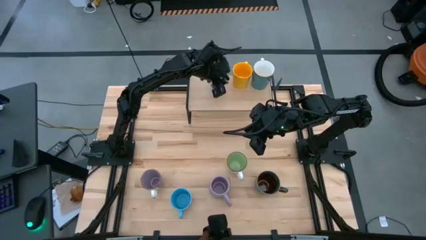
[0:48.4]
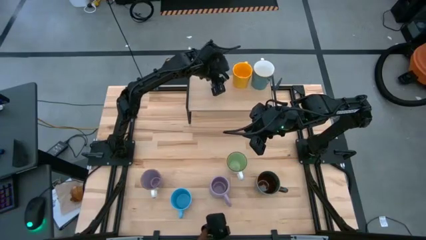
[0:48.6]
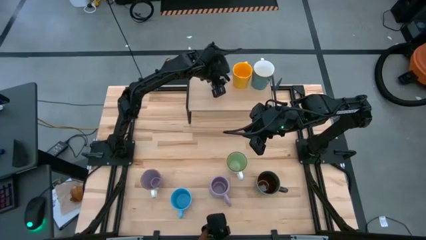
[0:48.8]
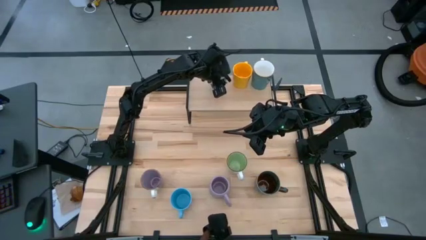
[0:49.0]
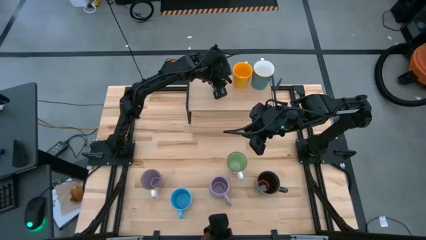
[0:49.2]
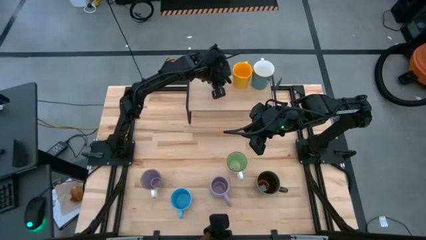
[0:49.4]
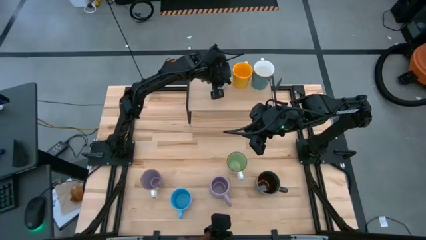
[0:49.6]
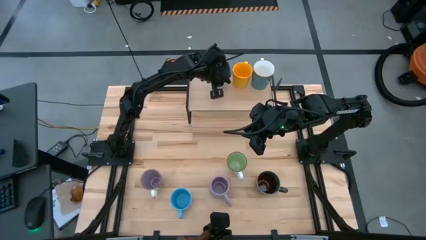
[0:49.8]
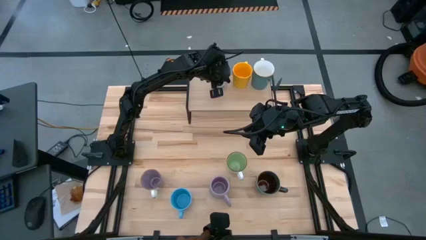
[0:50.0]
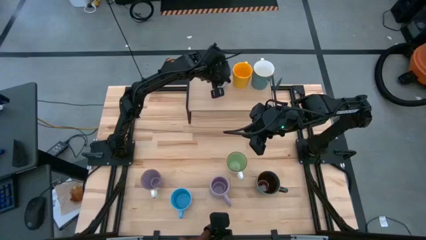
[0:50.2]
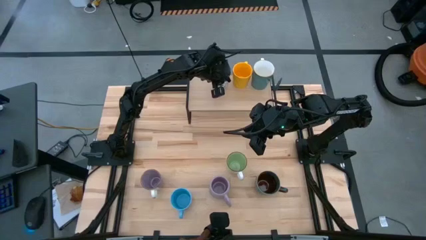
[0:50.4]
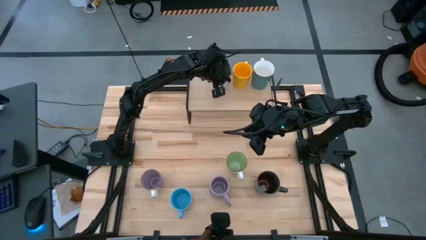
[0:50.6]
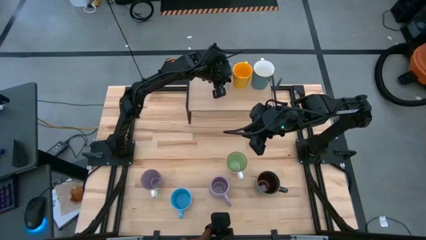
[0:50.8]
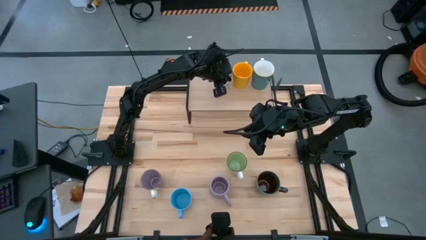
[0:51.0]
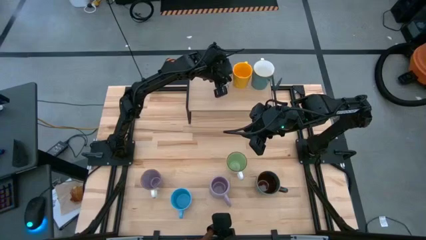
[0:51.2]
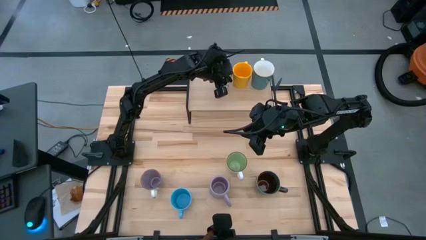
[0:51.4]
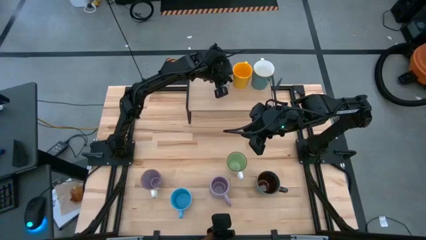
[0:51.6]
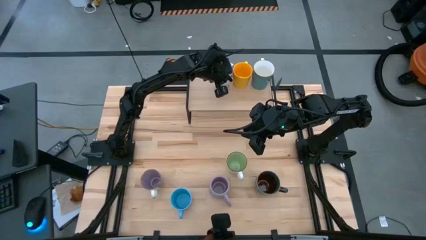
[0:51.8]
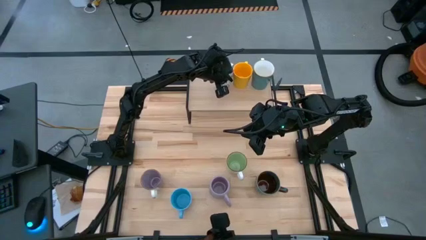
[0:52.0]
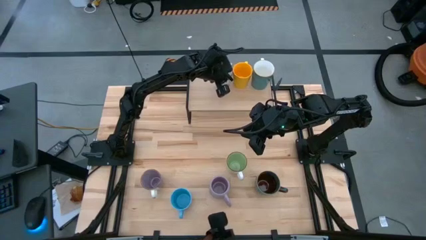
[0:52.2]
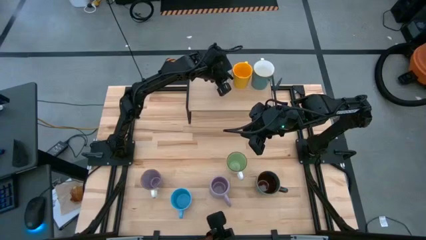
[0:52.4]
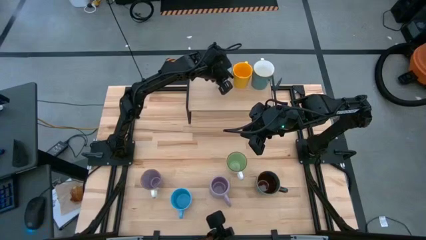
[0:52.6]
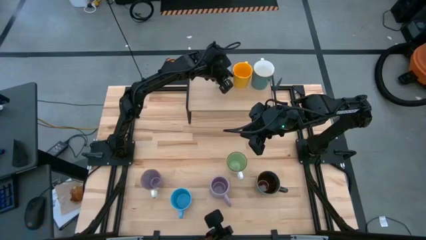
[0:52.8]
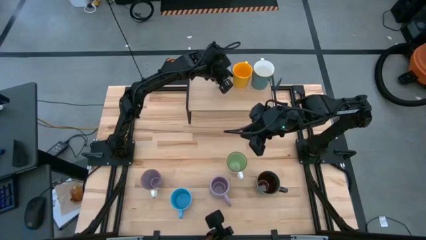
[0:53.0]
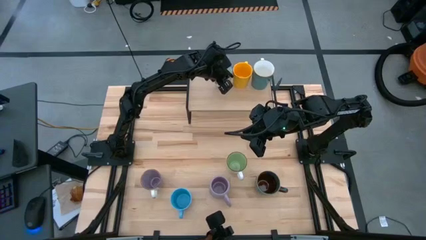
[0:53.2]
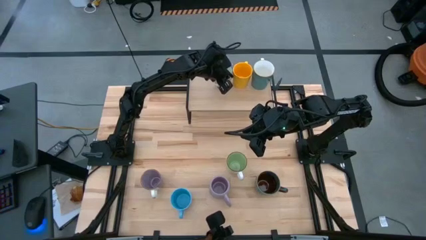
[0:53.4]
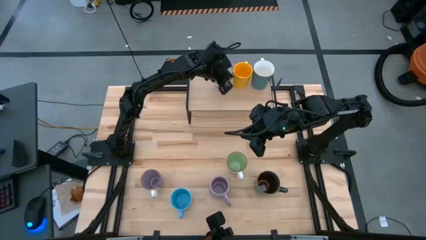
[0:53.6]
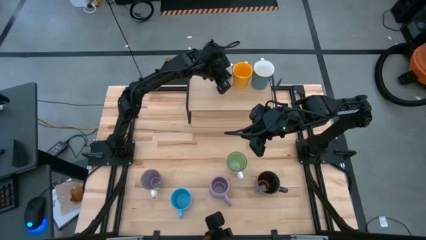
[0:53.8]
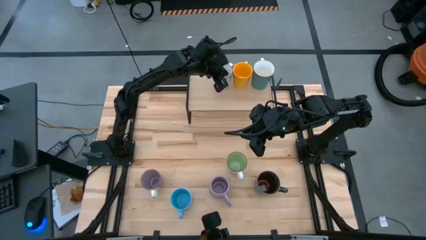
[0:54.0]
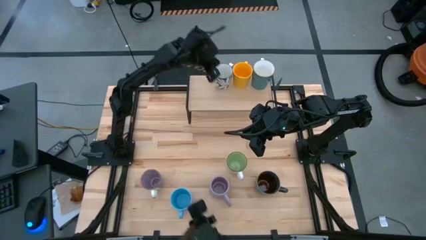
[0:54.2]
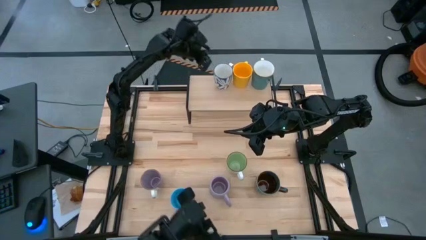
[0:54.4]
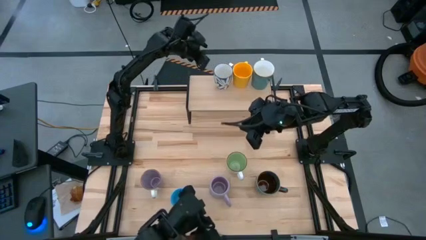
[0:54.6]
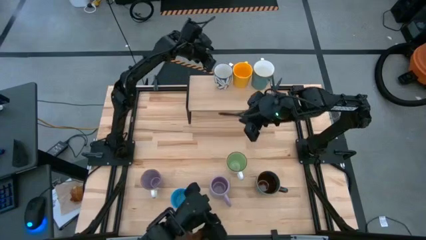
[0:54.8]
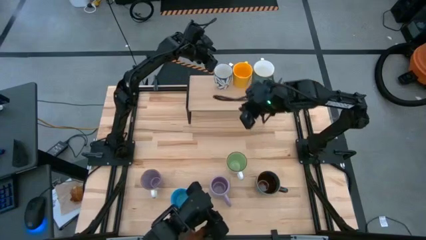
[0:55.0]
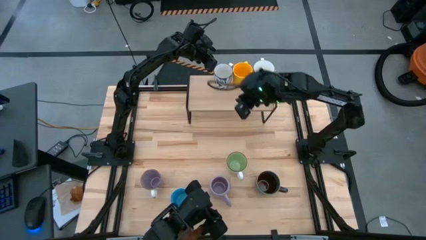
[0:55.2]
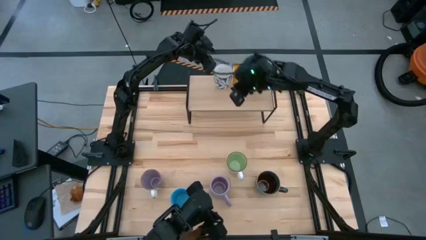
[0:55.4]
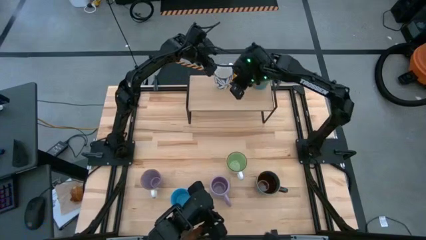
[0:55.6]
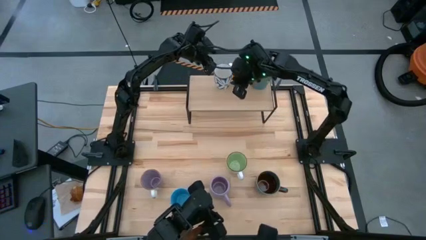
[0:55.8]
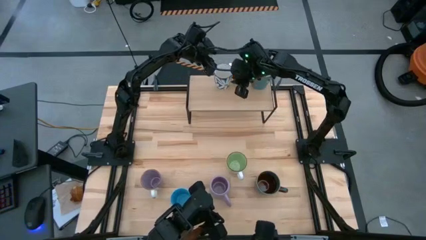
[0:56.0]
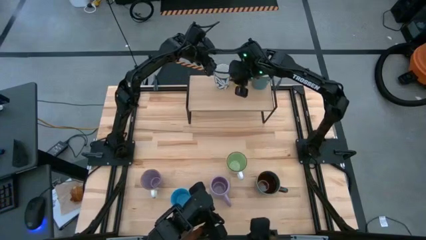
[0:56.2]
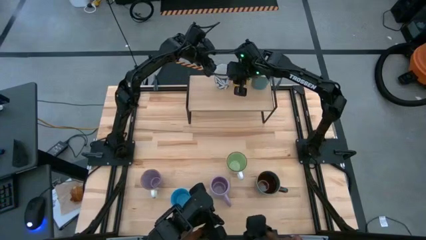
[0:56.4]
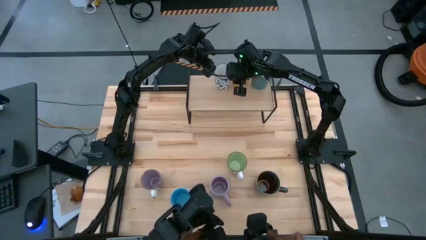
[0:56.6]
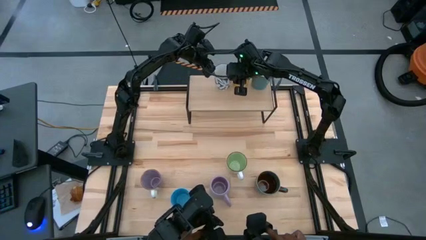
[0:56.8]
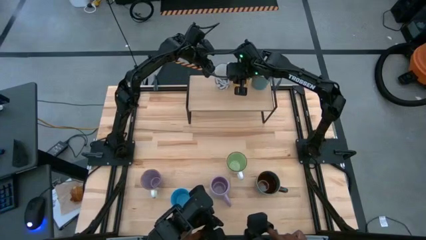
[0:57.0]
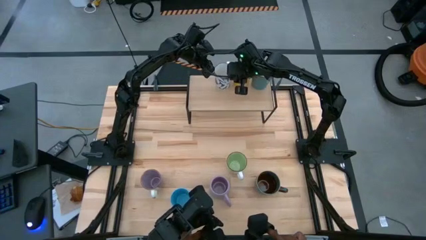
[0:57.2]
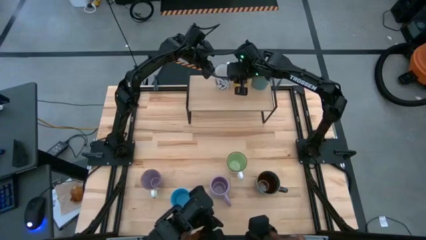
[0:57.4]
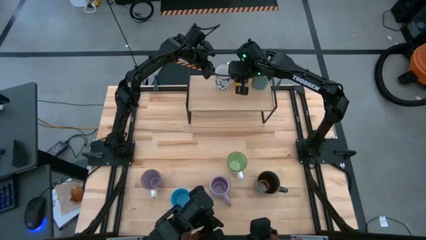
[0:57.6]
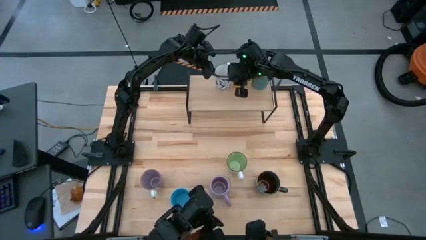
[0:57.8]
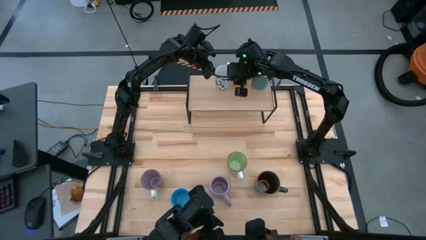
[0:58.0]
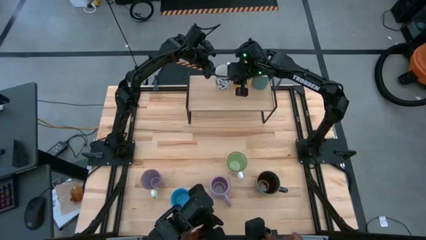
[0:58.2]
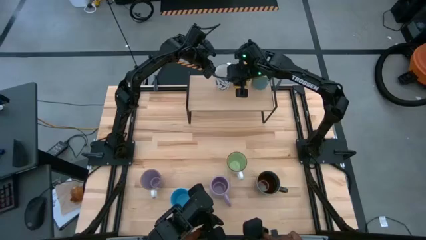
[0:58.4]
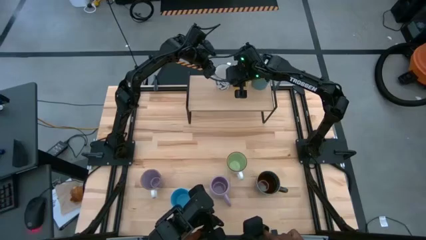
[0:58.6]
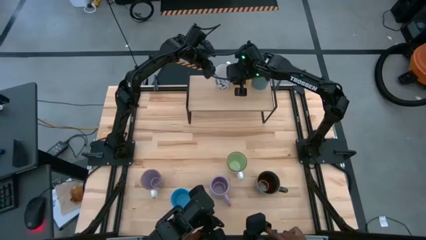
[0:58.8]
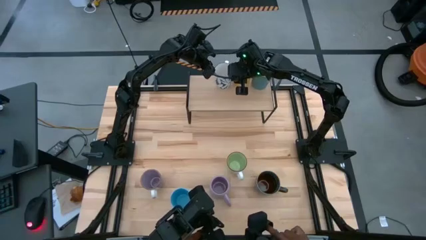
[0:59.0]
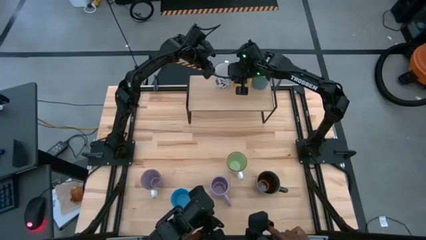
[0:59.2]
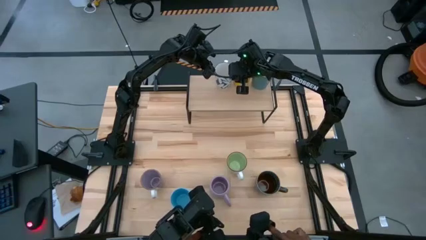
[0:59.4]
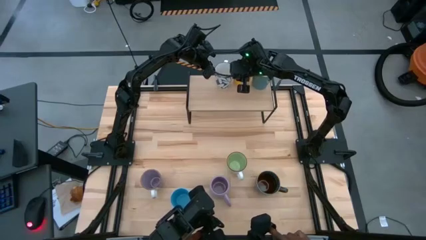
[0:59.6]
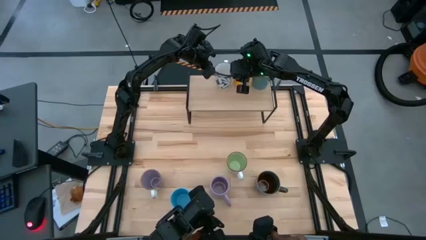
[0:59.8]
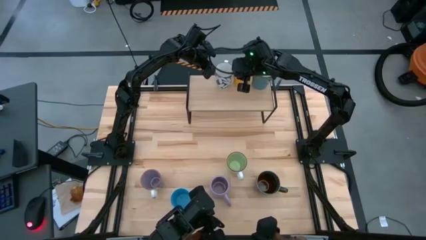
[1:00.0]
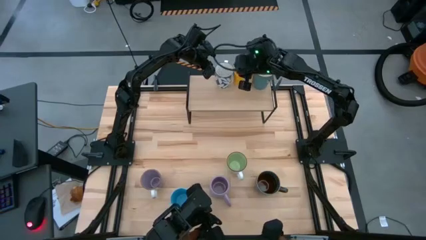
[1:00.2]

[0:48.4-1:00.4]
Task: Place coffee mugs
Put the white patterned mug on the shelf

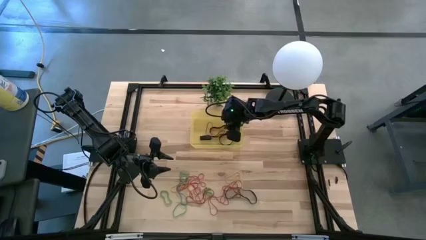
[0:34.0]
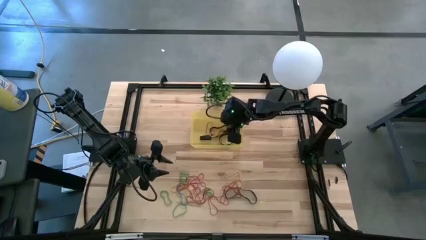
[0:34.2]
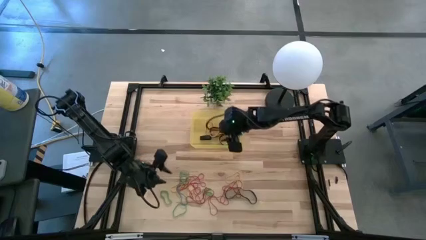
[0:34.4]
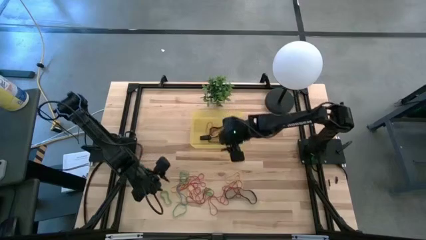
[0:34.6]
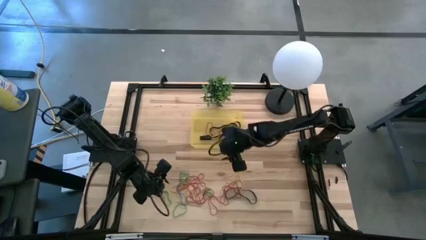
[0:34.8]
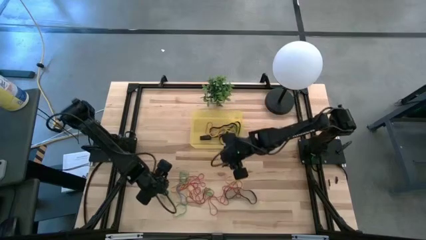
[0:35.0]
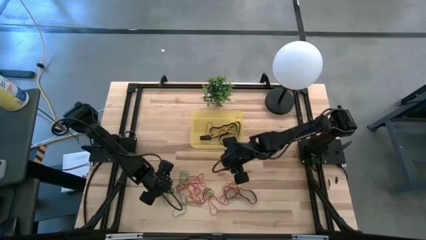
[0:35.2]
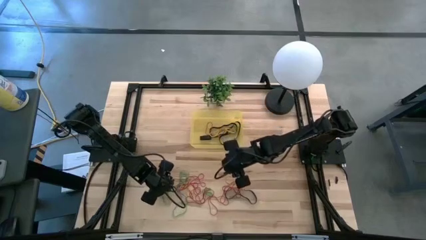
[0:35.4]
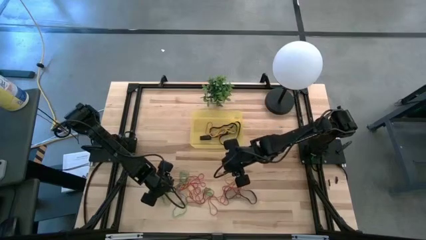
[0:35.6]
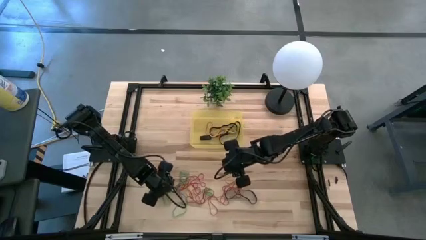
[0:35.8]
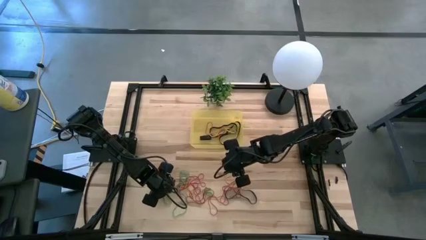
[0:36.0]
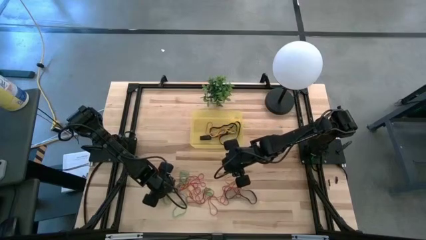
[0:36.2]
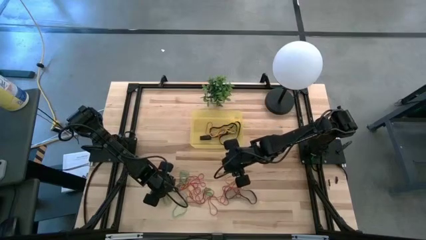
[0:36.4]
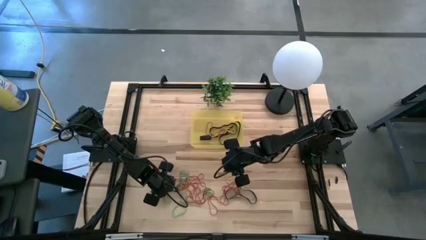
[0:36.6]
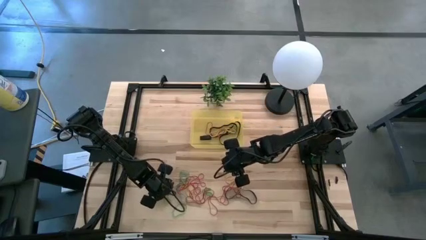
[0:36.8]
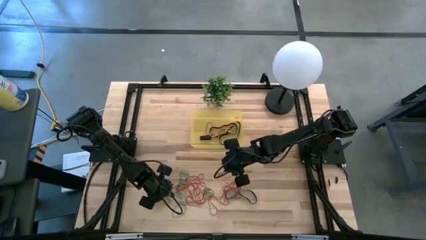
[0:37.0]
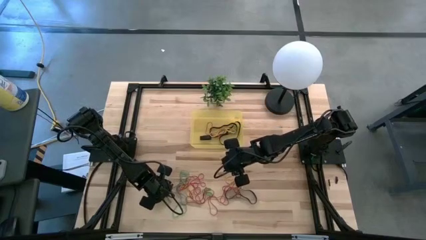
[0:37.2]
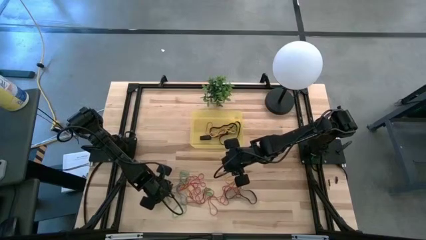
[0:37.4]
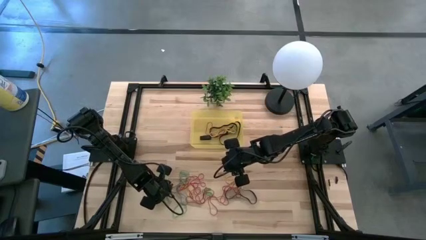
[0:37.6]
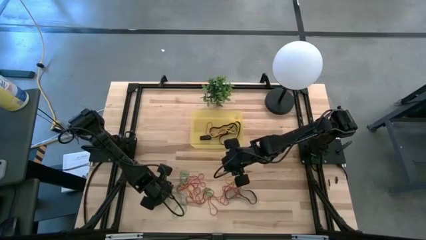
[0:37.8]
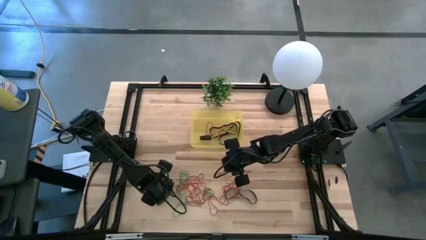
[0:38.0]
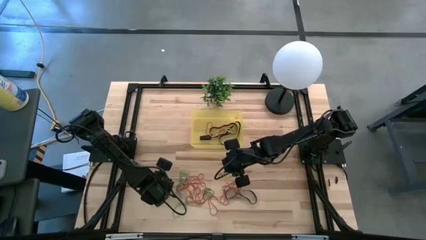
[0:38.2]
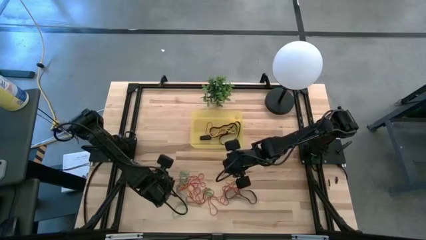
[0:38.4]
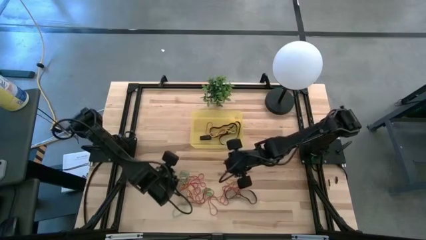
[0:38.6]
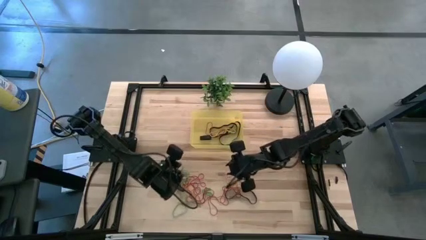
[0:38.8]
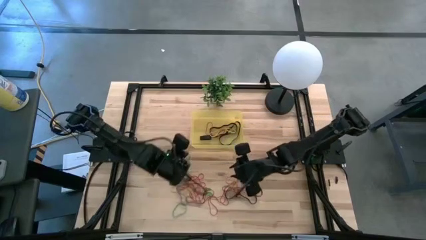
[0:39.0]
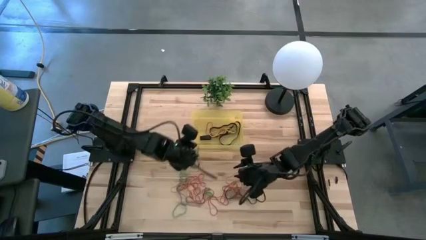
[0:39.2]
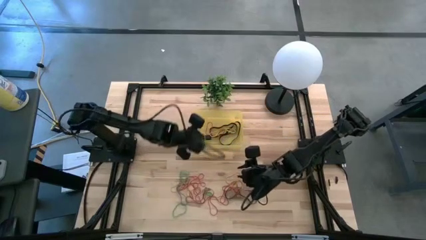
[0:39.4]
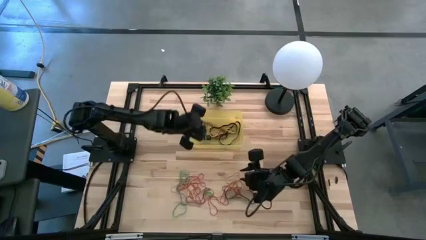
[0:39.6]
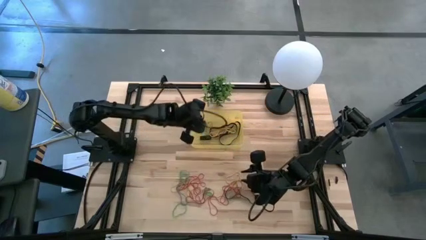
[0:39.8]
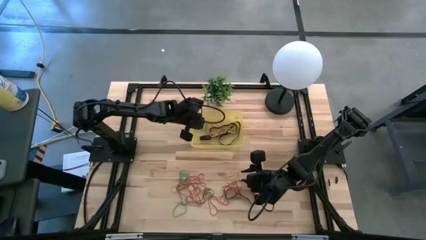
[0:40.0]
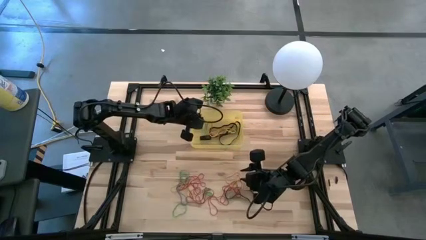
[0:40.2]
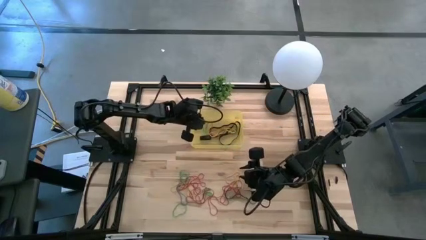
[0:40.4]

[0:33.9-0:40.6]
Task: Pick and place rubber bands into bin
Put the green rubber band into the yellow bin
